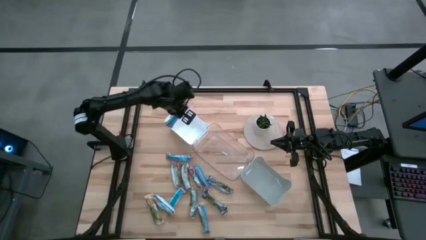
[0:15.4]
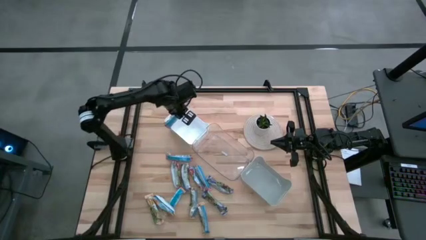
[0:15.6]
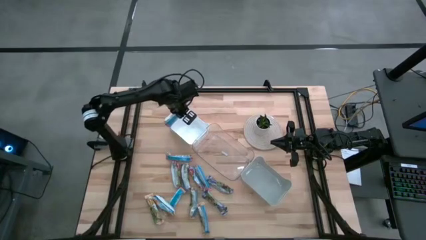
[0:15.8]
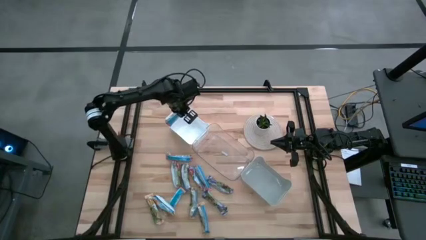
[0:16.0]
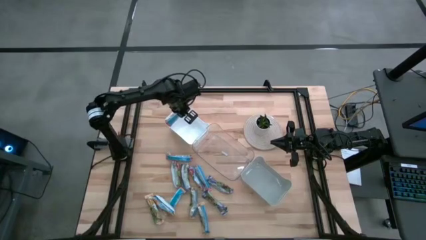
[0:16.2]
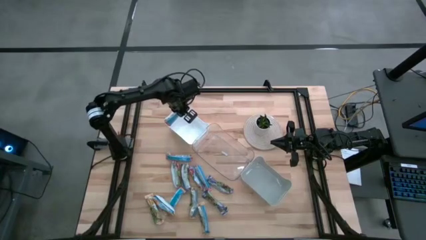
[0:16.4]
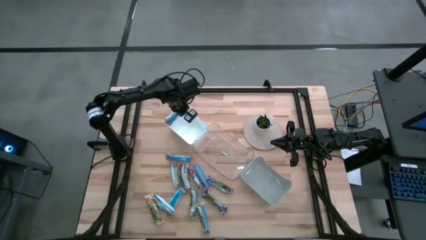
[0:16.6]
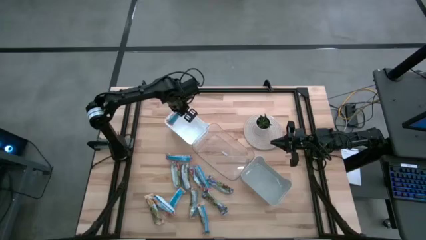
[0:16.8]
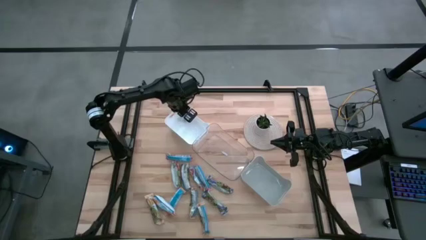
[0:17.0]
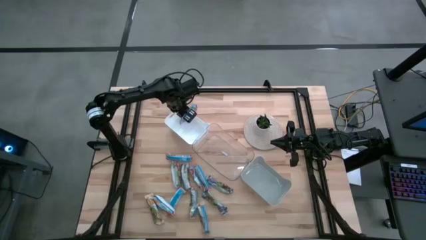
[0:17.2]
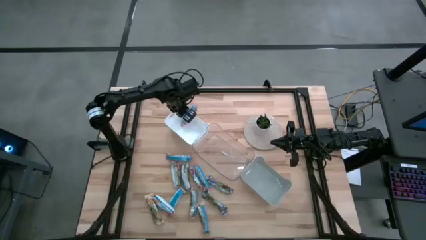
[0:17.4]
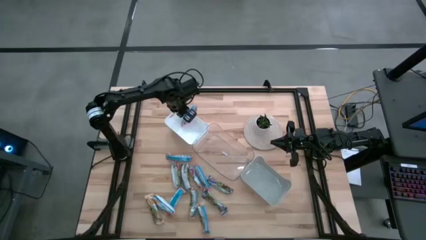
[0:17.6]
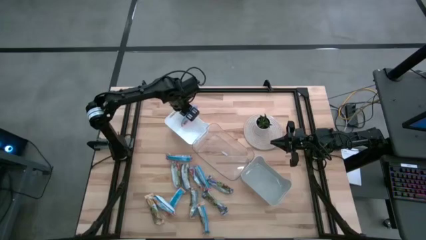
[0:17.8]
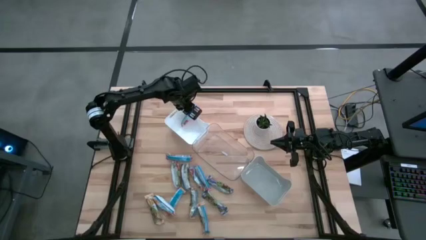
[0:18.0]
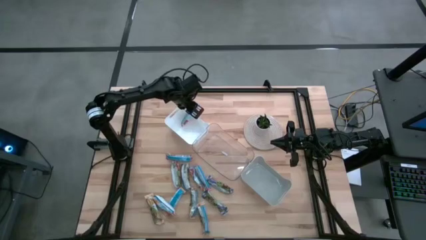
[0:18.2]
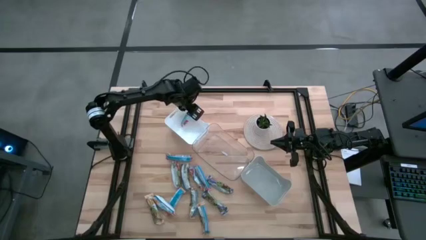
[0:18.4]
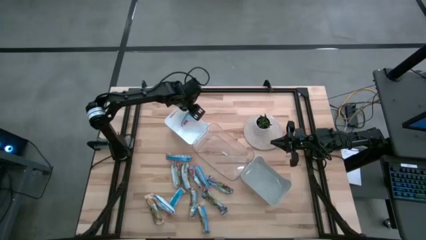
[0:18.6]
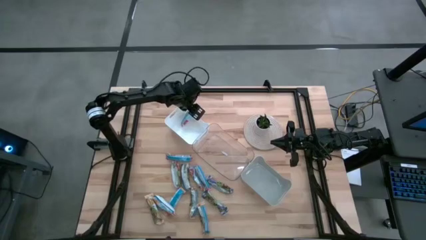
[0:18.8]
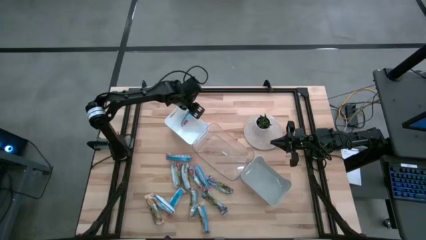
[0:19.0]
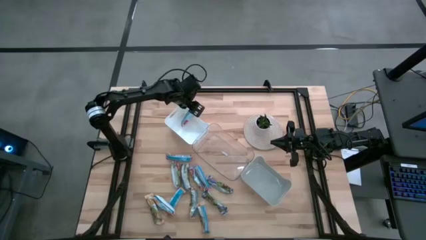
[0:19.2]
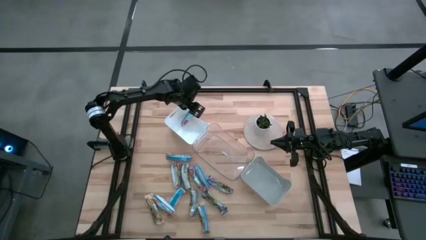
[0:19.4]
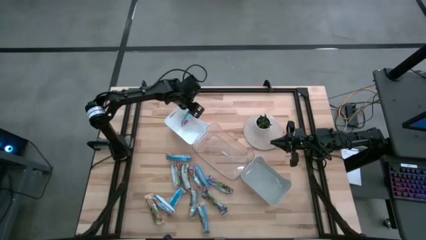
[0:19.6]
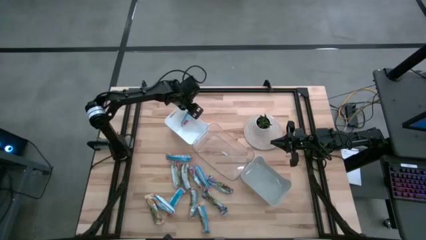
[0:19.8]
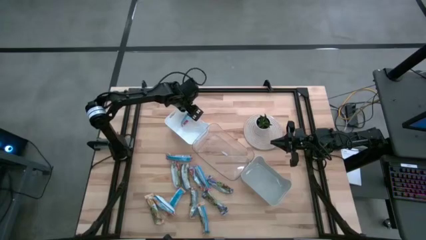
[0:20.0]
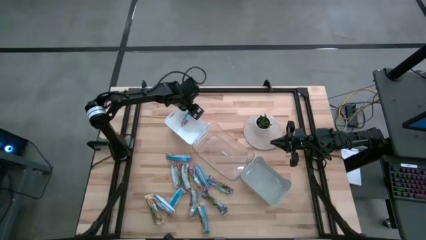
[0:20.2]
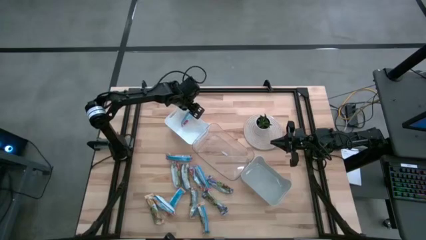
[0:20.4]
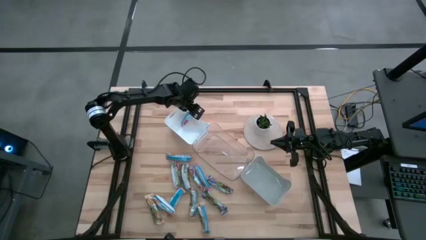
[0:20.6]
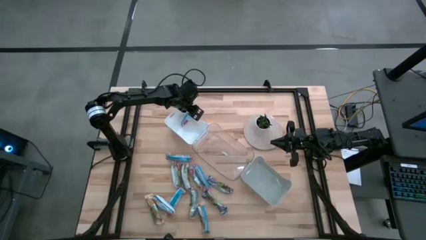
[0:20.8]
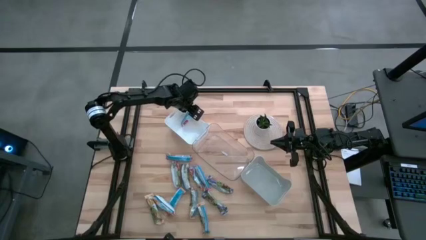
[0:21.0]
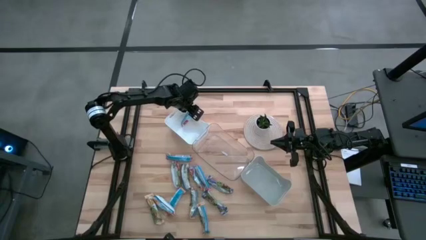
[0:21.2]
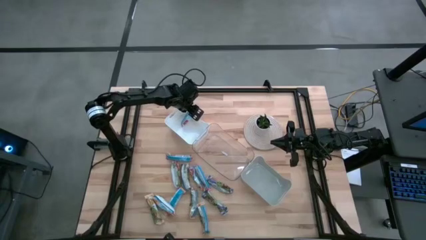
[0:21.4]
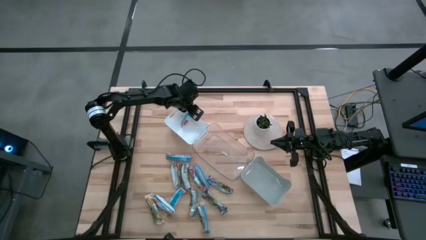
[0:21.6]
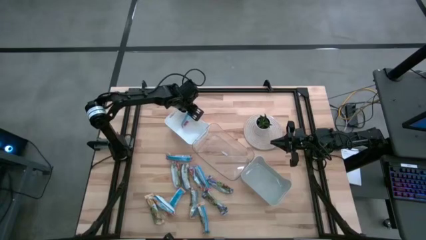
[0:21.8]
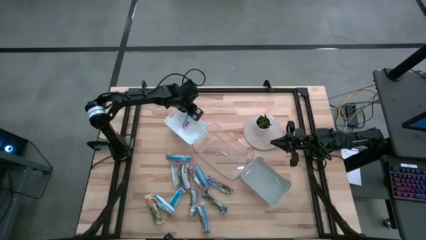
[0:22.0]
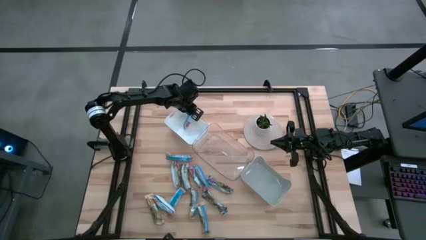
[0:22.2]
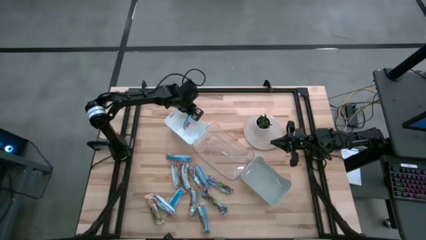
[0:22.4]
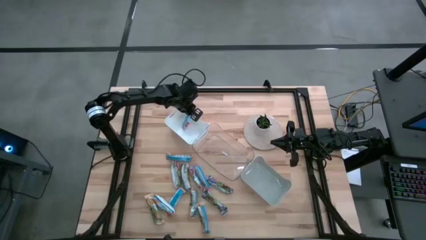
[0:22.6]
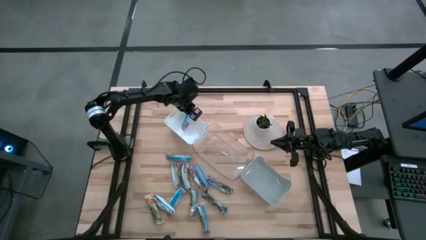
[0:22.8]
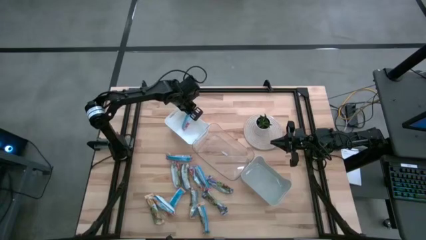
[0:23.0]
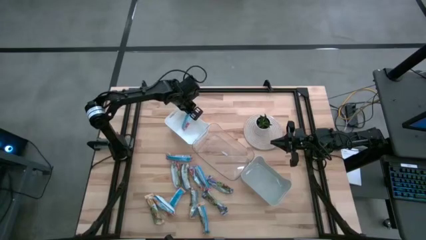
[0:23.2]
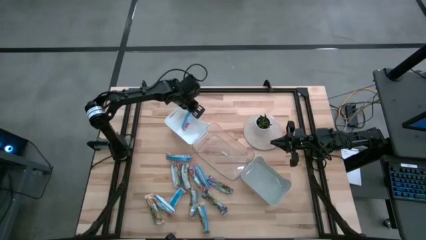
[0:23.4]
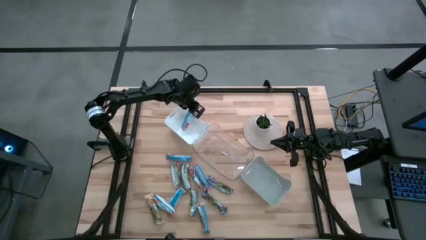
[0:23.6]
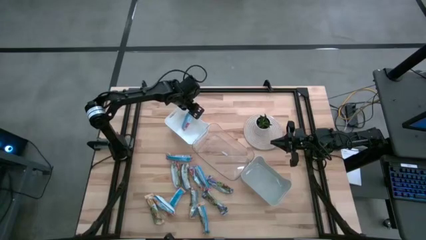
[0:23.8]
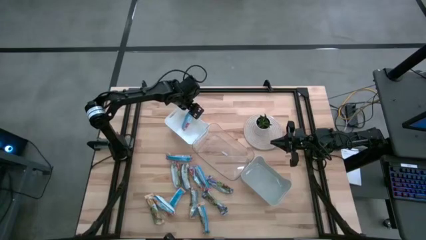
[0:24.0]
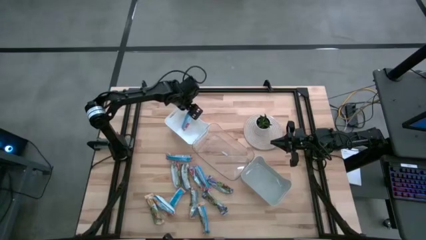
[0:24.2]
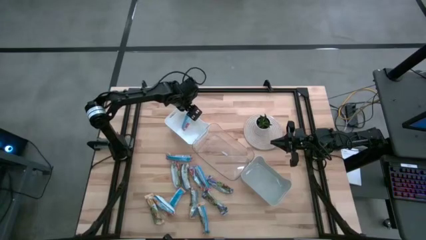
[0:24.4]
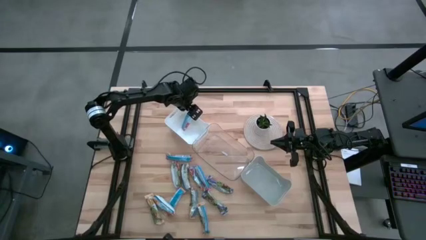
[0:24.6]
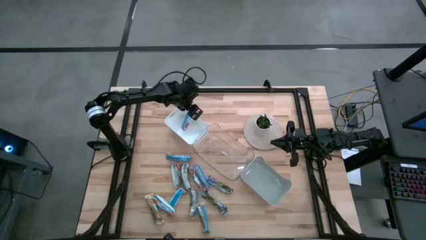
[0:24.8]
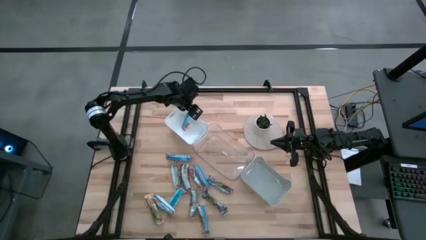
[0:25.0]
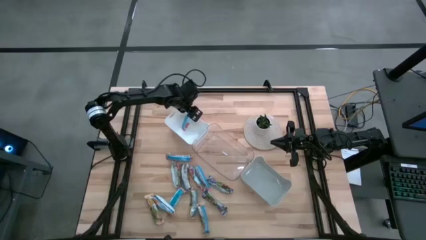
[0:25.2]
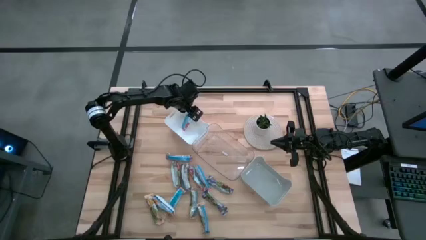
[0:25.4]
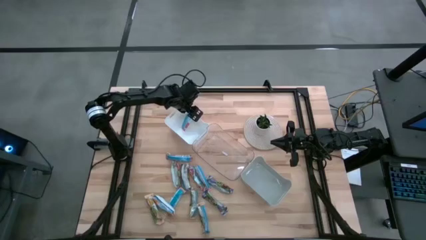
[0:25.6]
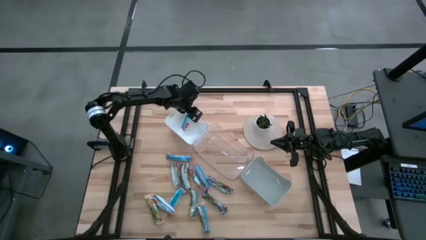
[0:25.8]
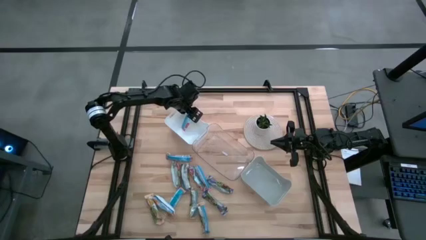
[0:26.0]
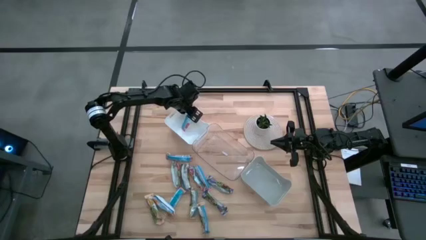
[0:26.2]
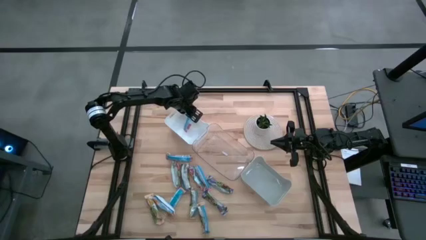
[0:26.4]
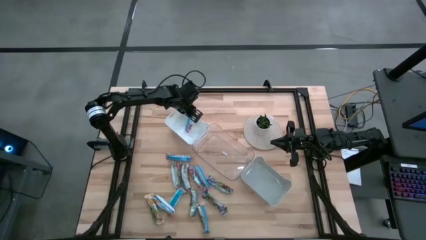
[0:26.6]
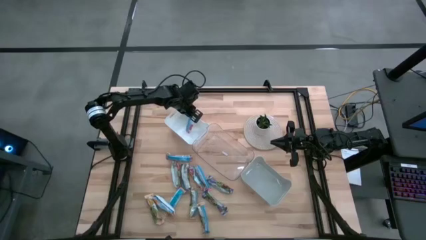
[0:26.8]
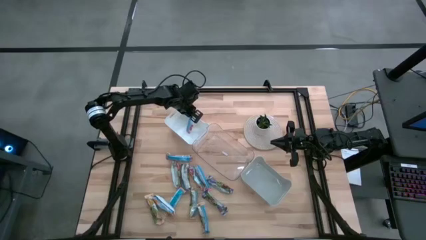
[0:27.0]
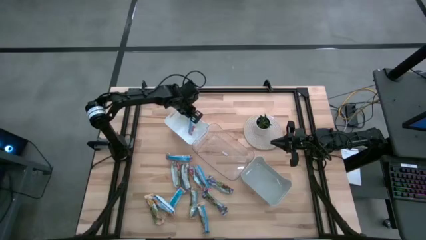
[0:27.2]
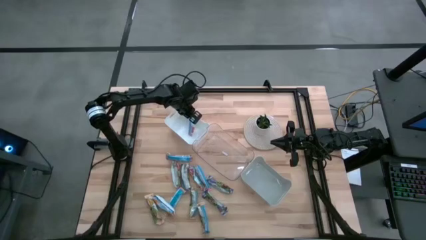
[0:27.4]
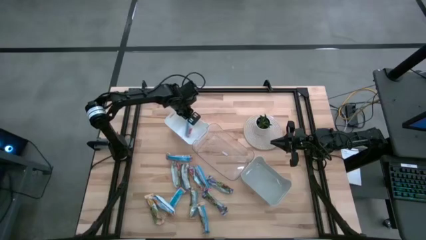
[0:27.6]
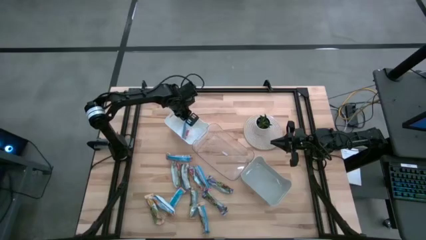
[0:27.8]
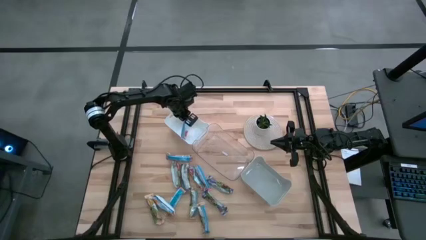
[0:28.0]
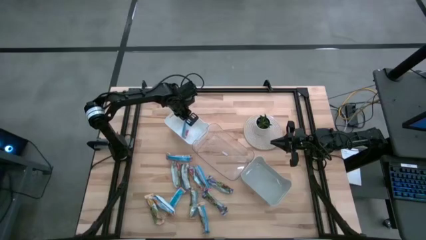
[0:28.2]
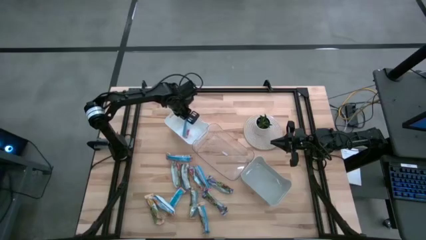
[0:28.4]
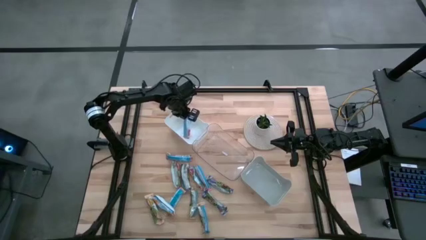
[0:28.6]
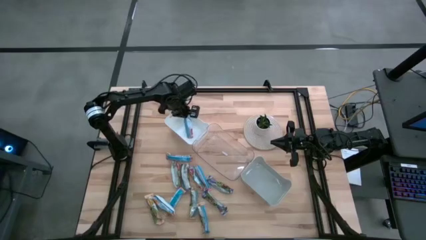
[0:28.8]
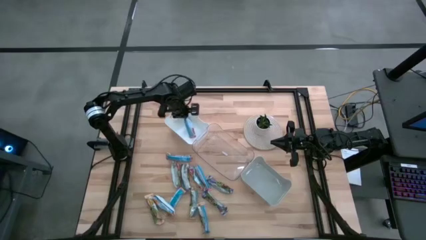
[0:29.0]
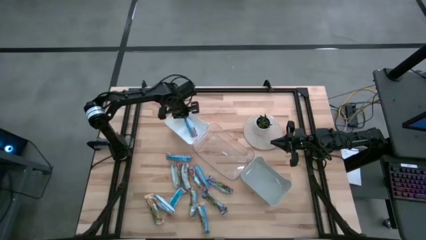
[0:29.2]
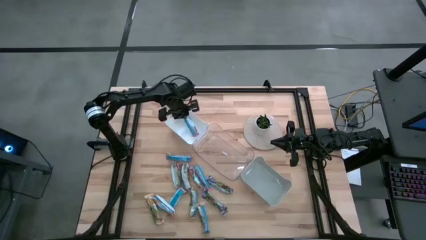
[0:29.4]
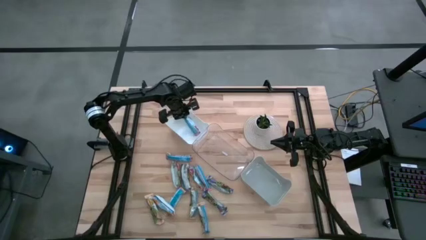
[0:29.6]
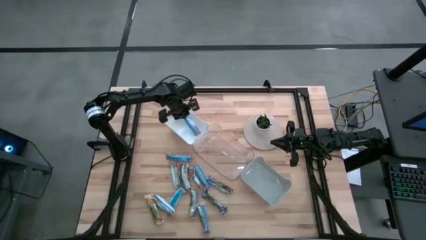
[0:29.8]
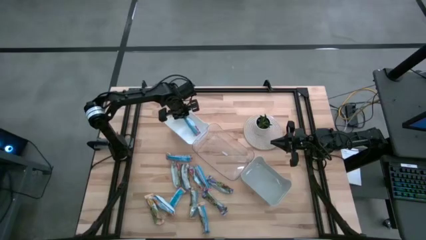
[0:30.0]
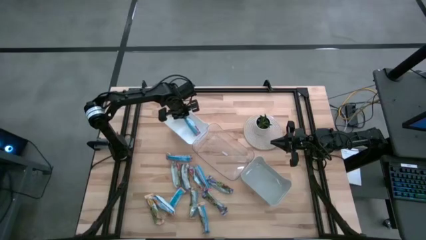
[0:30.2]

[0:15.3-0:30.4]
Task: Pick and place Granola Bars by type
Put the red granola bar into the white bin
